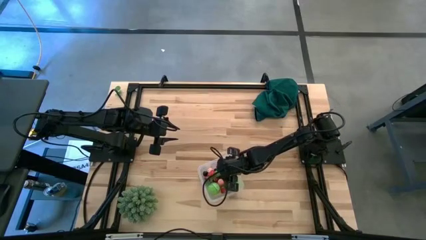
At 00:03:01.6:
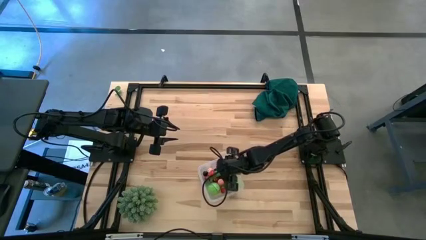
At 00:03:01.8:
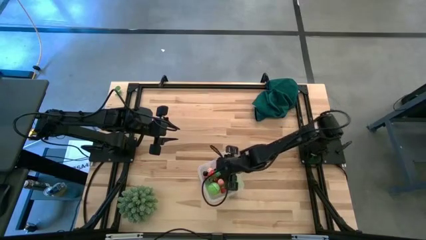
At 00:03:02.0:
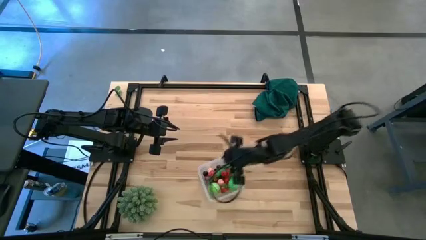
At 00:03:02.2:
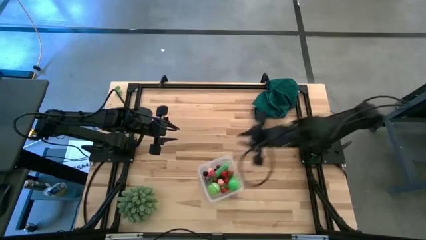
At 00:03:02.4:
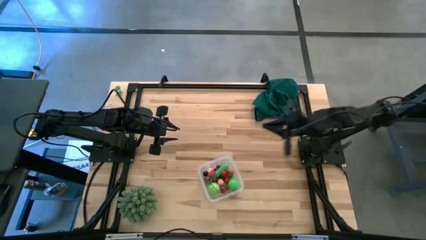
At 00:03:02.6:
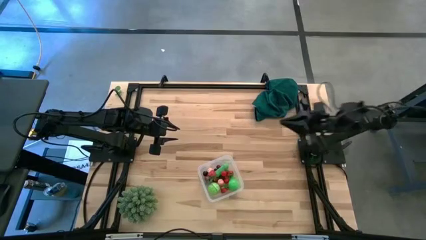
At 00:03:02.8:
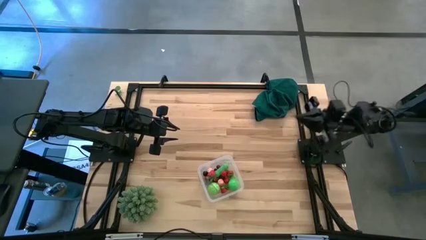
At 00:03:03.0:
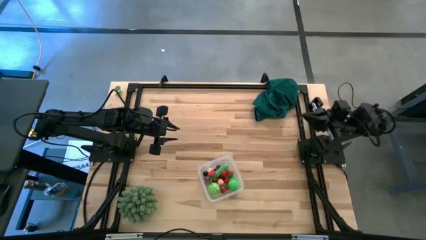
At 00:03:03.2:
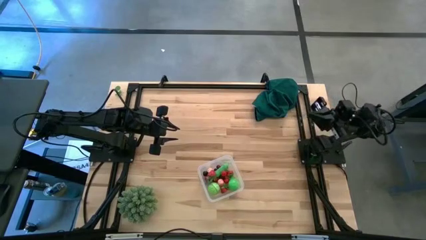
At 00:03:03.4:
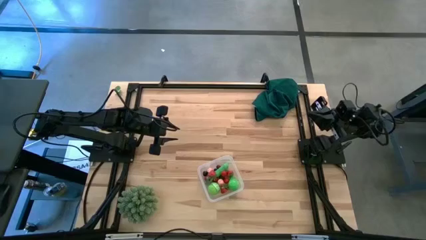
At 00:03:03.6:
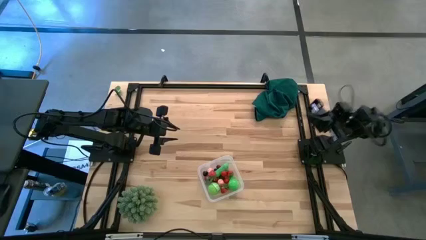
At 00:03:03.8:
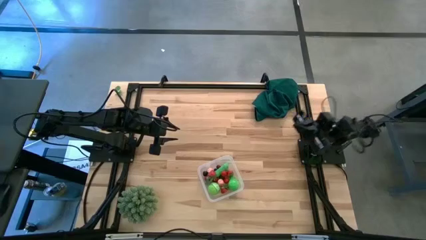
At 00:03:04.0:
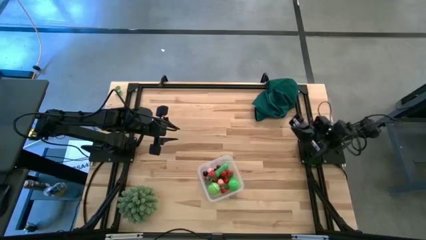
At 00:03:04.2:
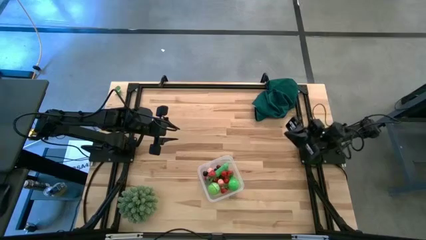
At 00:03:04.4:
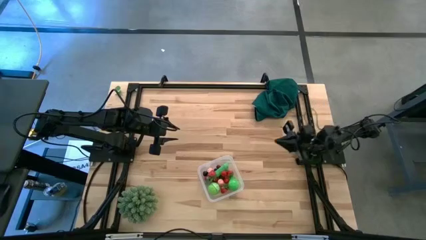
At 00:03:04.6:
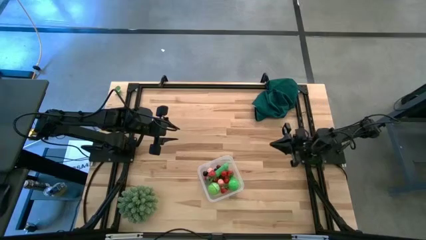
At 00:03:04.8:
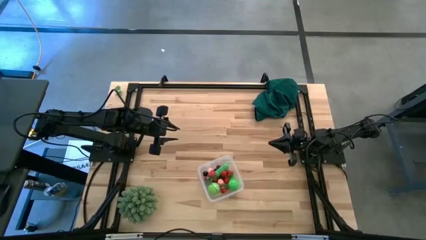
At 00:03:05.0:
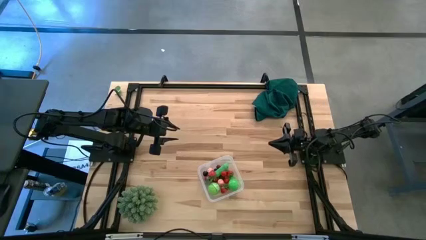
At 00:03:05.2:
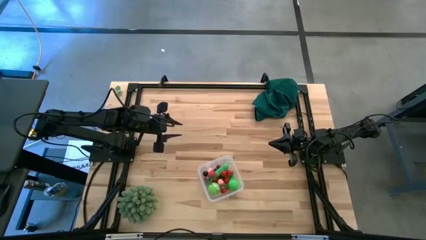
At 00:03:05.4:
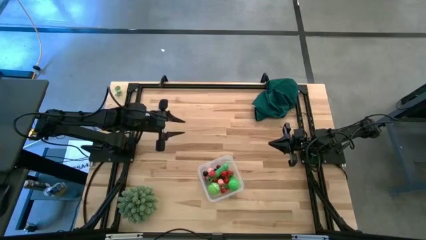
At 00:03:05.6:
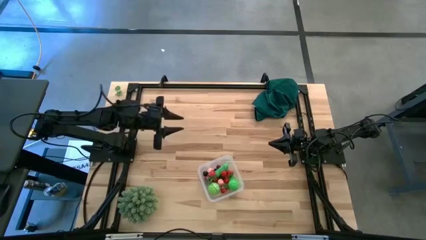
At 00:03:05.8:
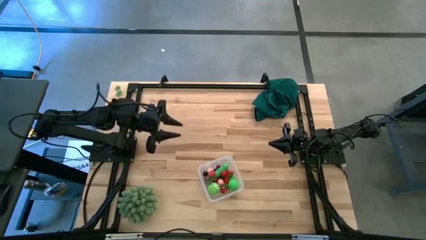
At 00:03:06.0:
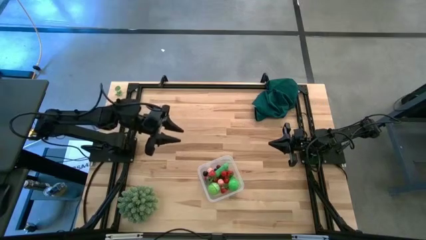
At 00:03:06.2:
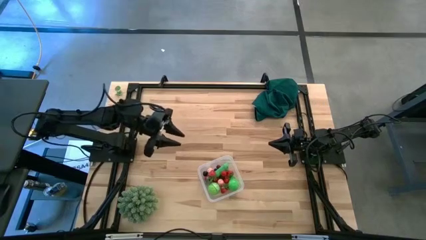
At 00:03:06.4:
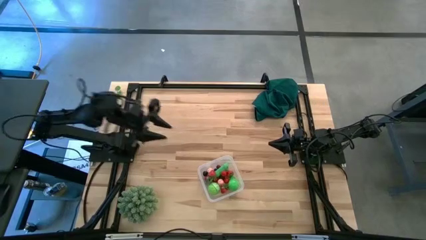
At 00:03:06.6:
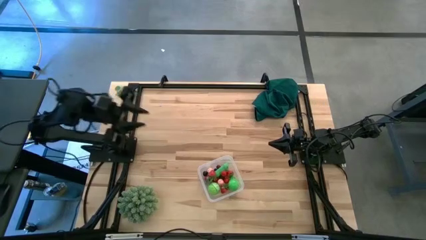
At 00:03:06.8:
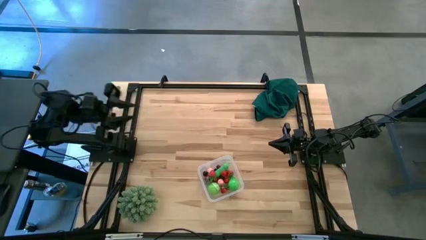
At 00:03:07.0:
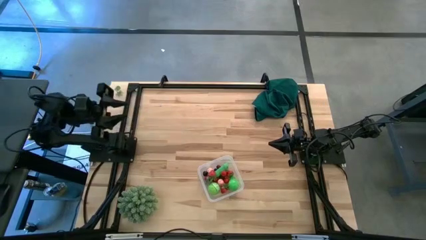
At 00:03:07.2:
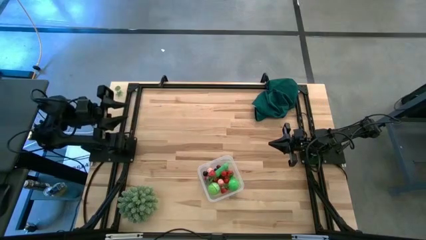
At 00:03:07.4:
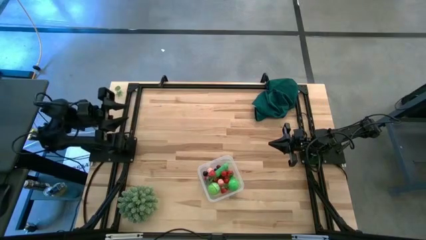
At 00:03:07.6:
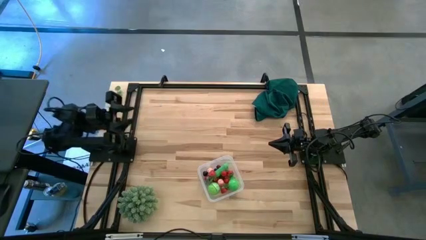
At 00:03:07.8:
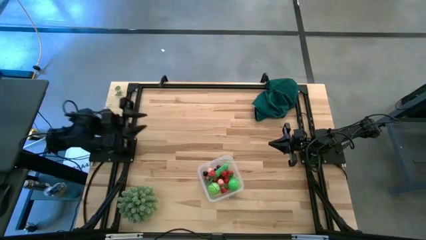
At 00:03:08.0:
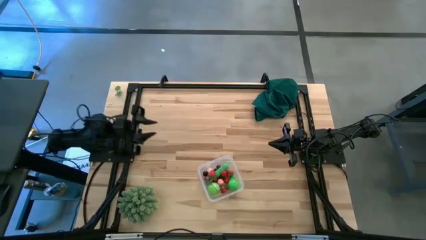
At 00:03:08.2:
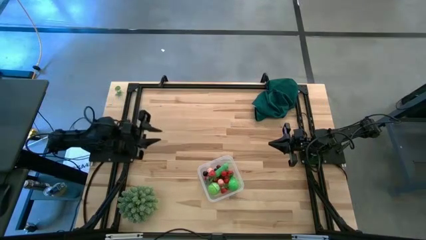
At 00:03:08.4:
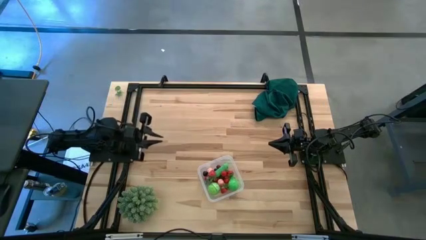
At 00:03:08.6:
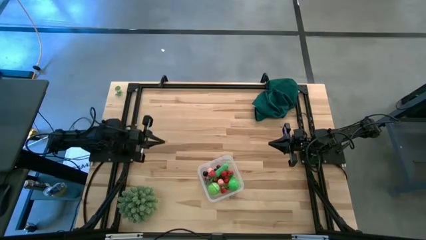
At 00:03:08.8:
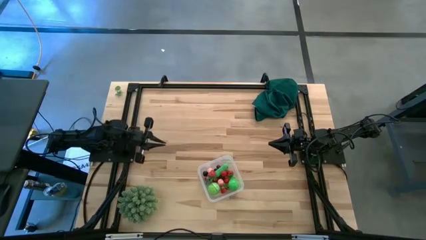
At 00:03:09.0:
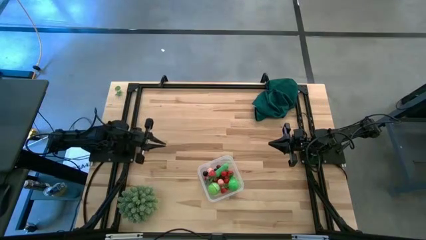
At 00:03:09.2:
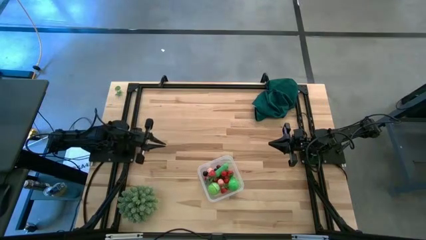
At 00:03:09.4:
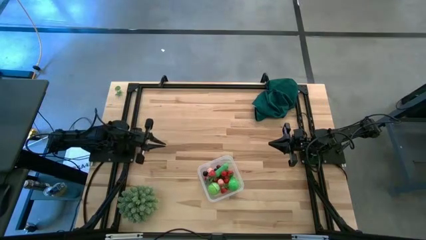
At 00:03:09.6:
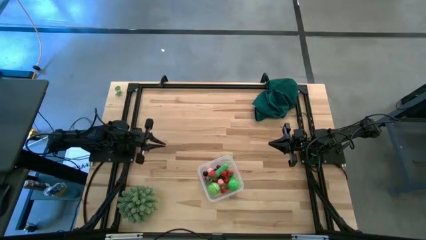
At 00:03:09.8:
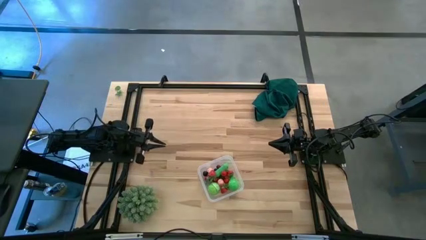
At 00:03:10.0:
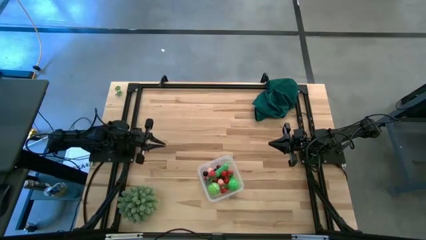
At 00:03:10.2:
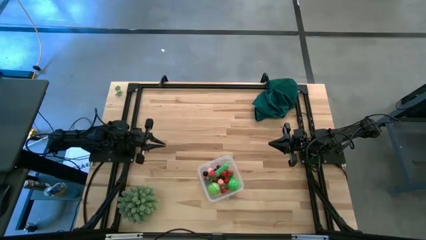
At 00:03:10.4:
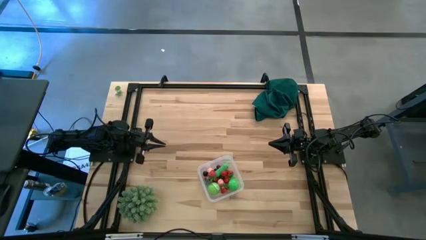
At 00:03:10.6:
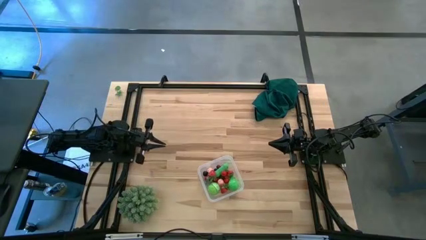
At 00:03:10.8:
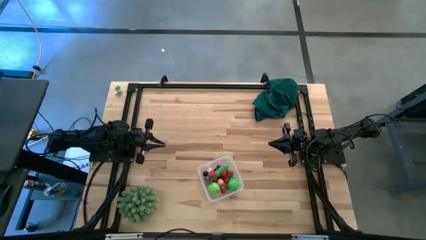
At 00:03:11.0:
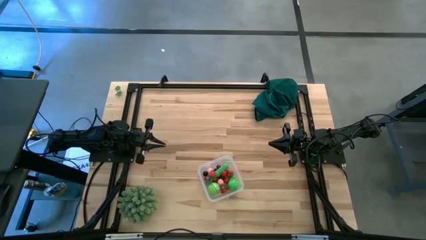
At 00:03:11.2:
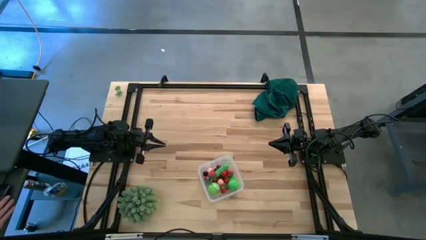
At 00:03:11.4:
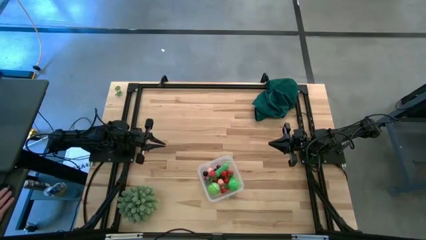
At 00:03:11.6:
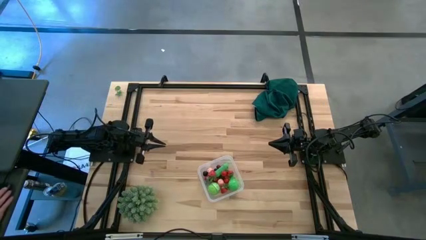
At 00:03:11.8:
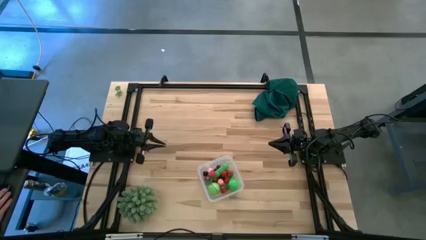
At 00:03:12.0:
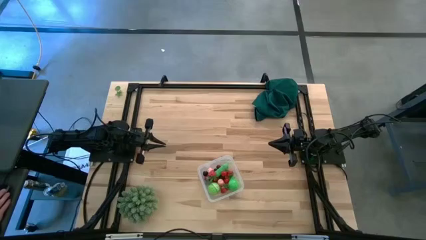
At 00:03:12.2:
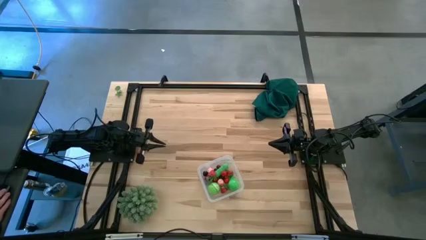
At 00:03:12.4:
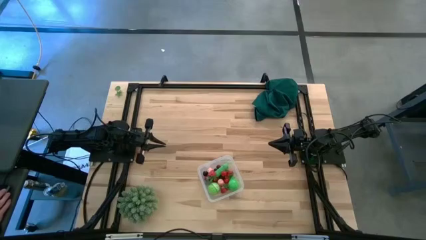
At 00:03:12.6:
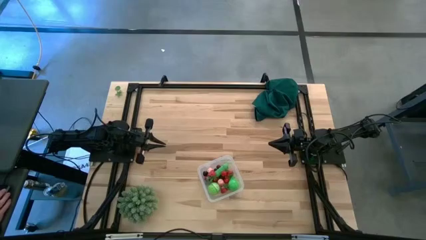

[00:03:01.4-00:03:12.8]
Task: Pick and placing Produce into tupperware
Return to Home Position

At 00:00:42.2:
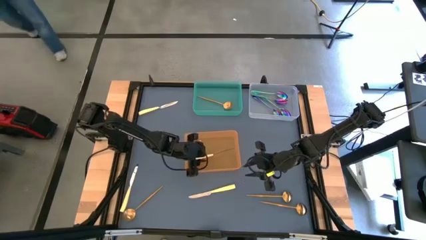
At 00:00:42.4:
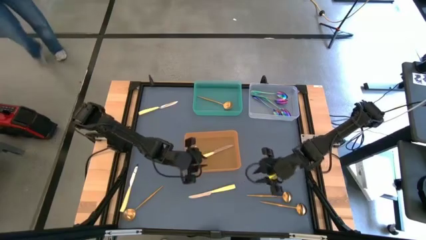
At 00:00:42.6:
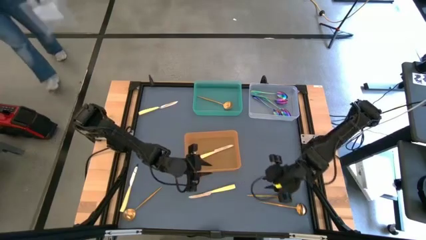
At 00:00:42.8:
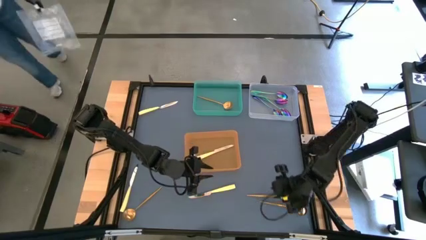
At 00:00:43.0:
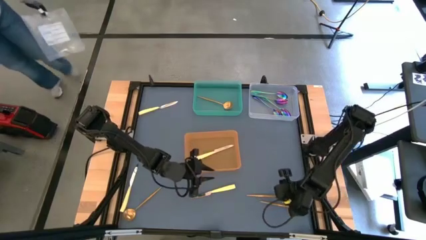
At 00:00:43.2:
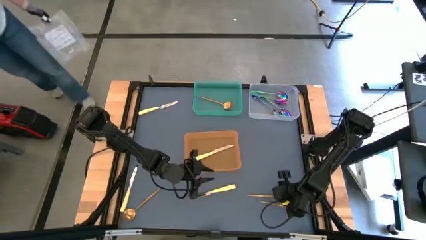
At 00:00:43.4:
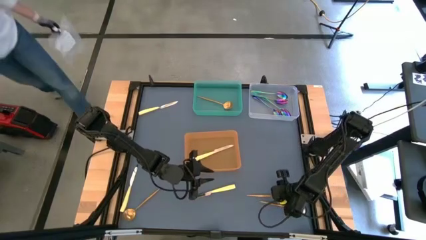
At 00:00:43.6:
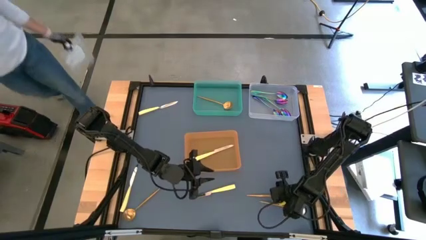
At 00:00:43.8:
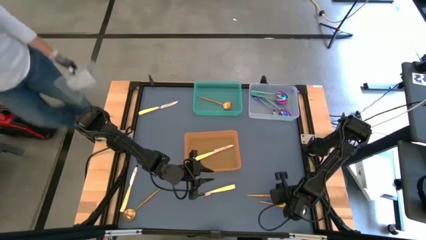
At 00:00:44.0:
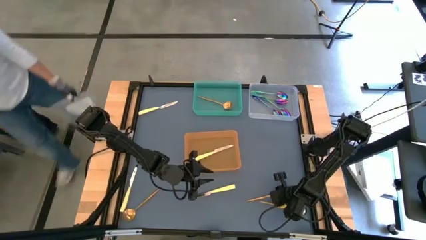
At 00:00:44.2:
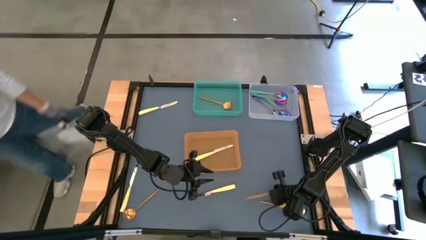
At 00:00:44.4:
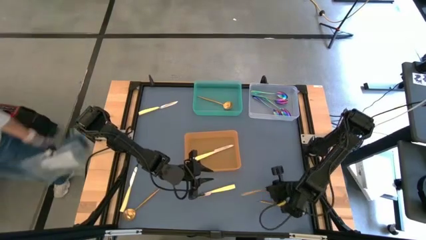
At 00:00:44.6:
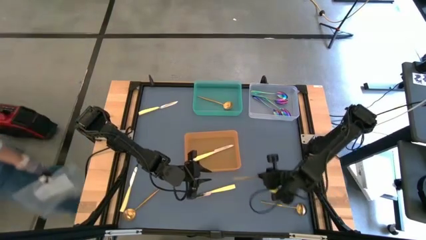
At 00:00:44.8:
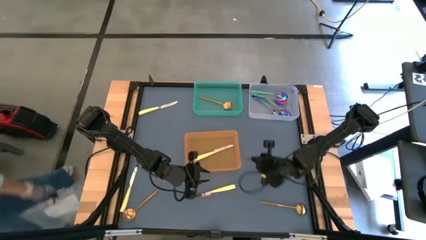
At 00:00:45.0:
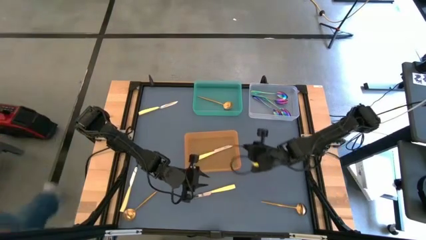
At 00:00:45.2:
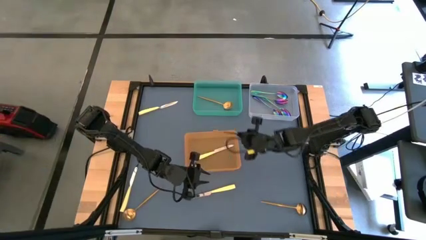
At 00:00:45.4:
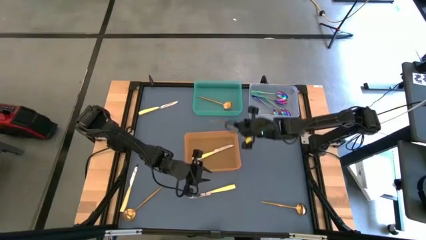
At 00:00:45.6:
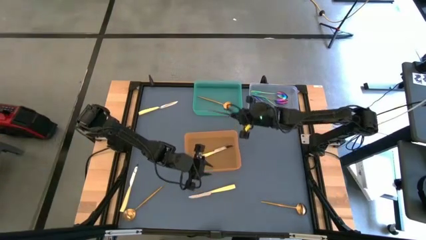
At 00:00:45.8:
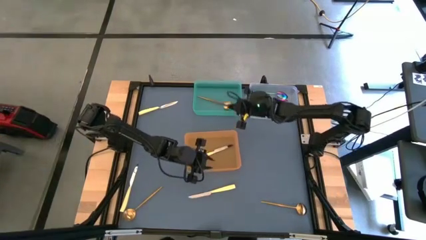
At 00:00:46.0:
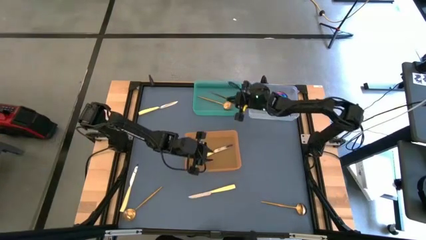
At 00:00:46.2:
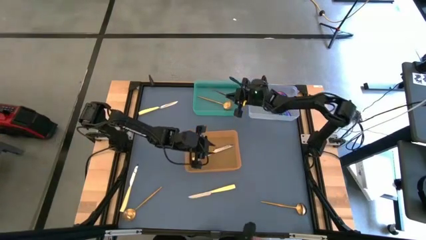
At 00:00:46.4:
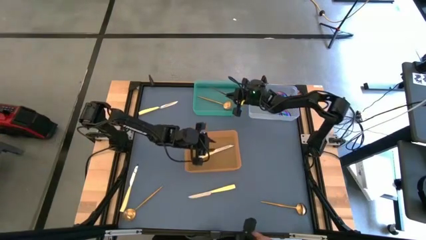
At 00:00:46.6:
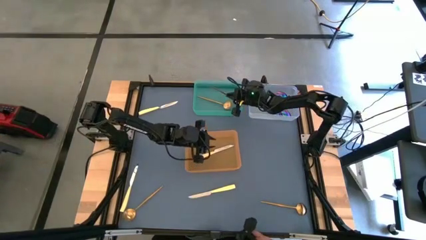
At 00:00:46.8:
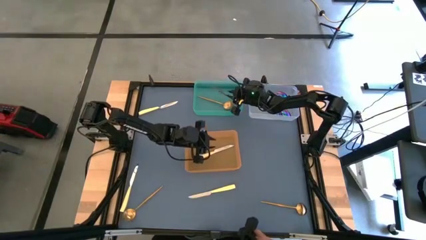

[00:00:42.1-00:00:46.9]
Task: Sort silverware by color (type)
Put the gold spoon into the green bin

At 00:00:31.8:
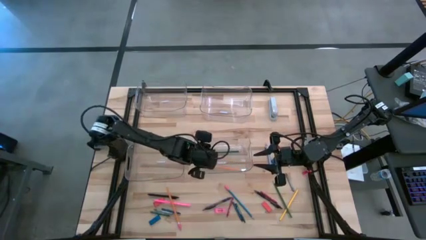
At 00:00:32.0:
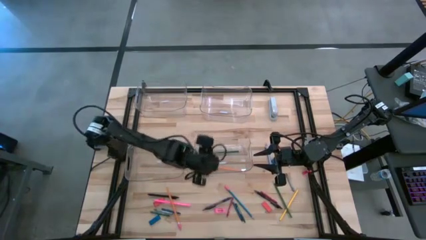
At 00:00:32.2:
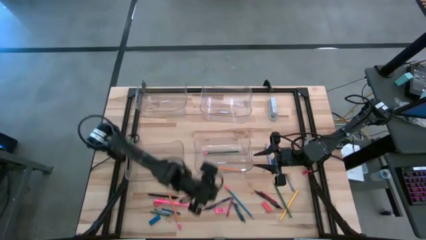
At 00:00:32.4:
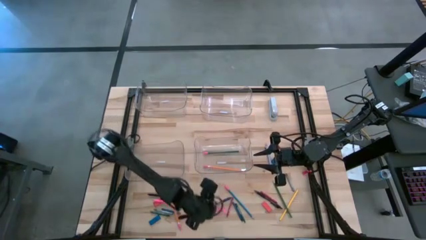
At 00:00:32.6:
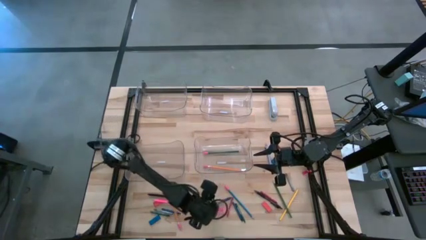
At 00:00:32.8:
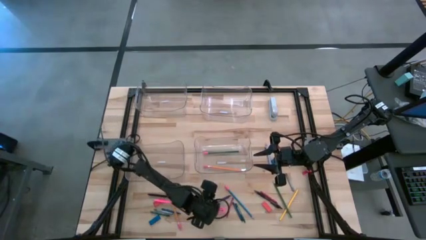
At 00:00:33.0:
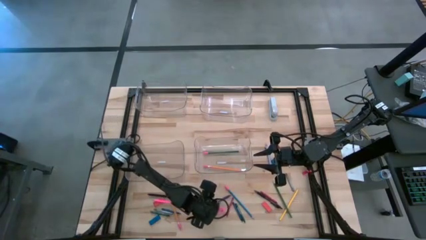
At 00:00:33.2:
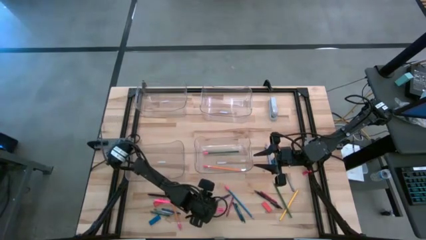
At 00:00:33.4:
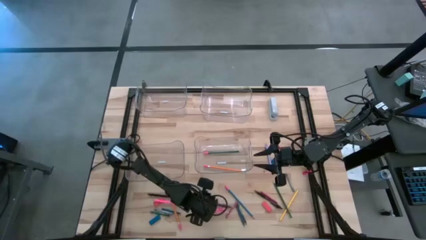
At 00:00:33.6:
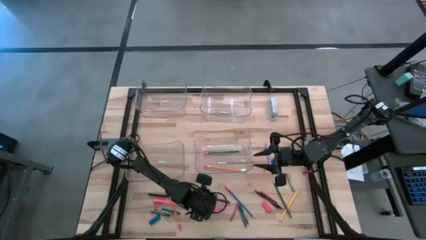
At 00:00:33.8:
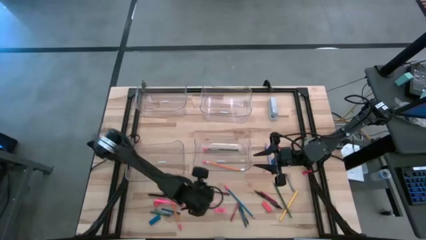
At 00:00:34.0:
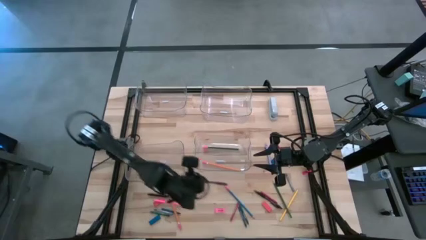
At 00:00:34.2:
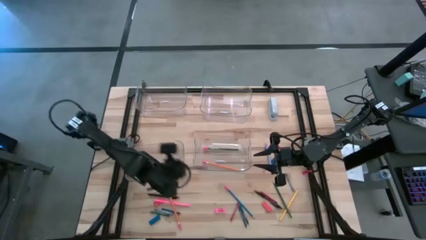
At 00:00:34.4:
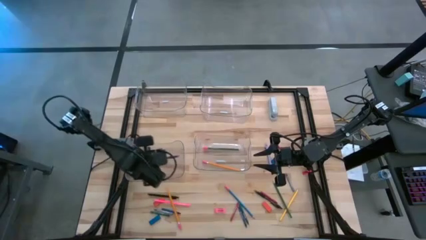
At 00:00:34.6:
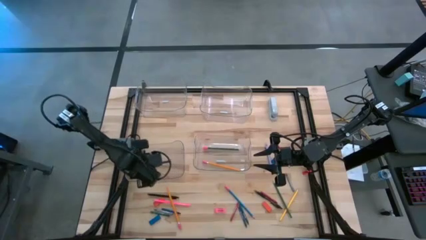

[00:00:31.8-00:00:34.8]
Task: Sort crayons/erasers/pens/pencils in bins
Put the violet pen into the bottom left transparent bin
